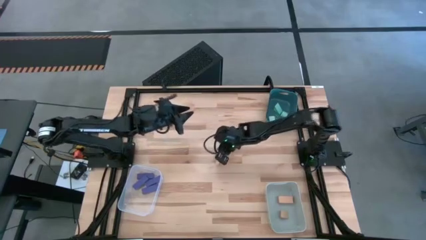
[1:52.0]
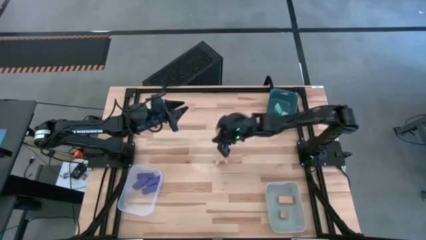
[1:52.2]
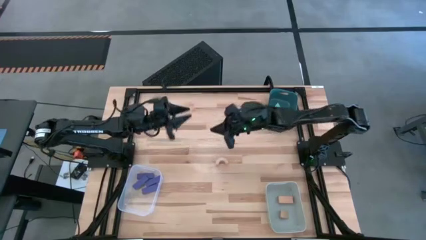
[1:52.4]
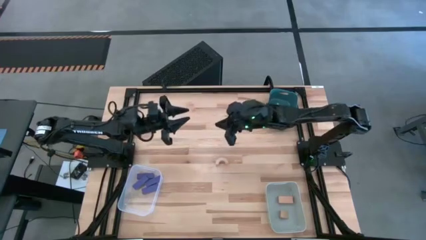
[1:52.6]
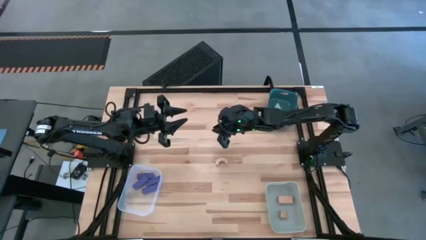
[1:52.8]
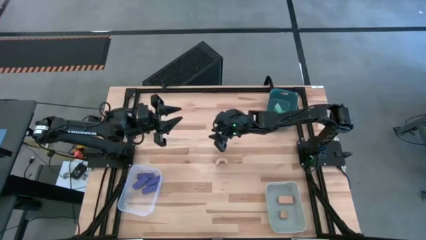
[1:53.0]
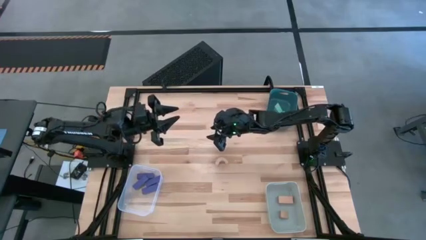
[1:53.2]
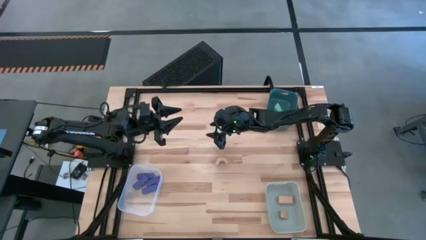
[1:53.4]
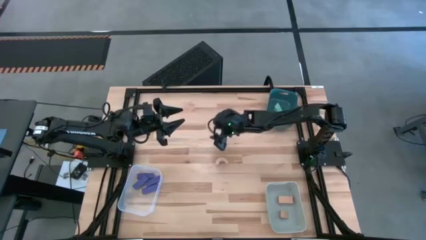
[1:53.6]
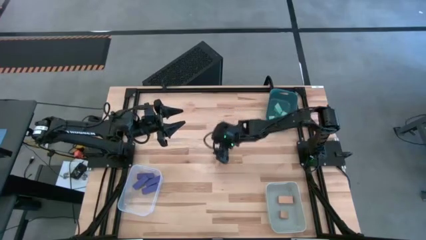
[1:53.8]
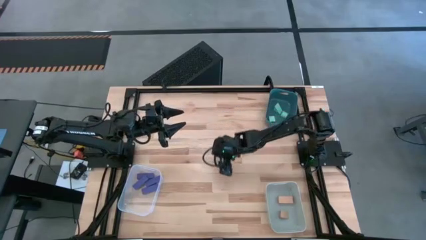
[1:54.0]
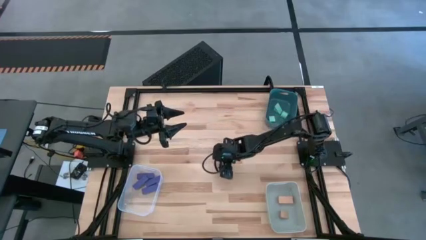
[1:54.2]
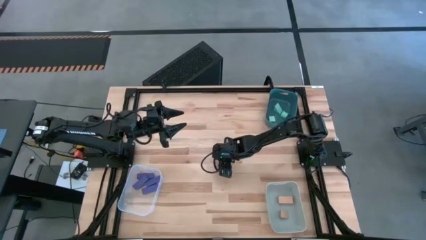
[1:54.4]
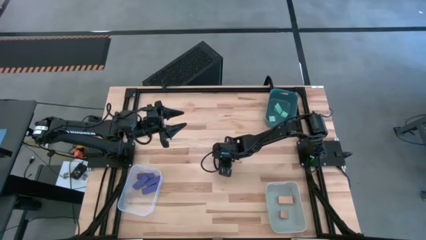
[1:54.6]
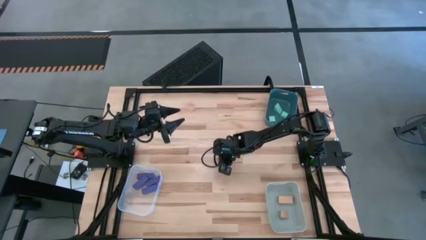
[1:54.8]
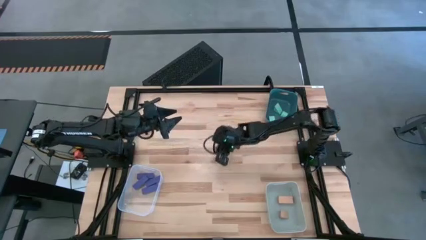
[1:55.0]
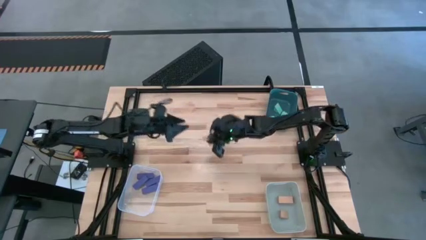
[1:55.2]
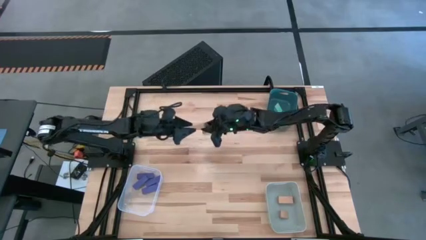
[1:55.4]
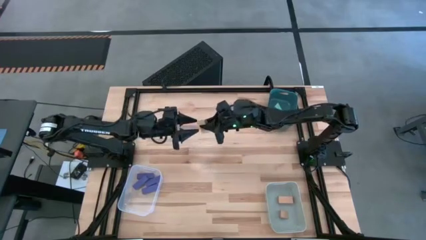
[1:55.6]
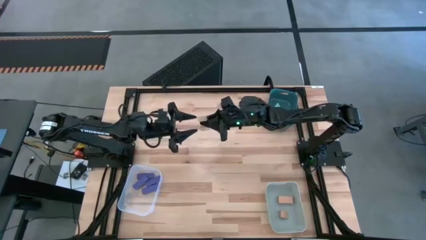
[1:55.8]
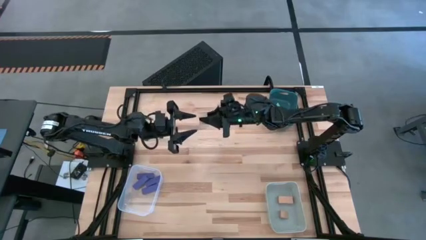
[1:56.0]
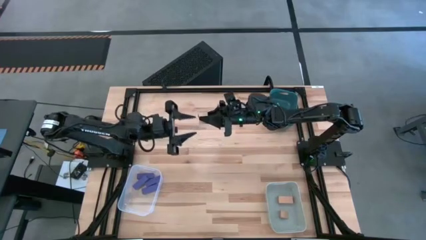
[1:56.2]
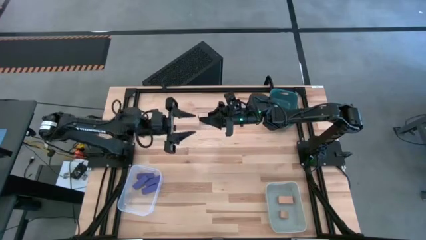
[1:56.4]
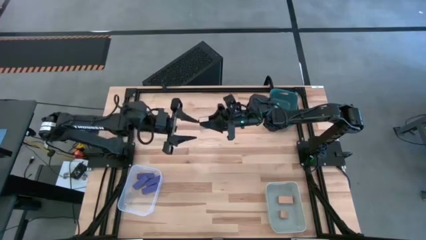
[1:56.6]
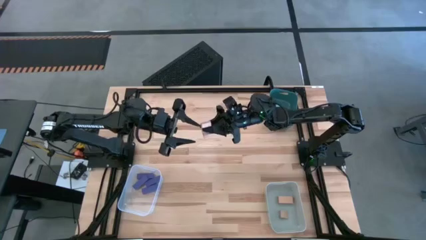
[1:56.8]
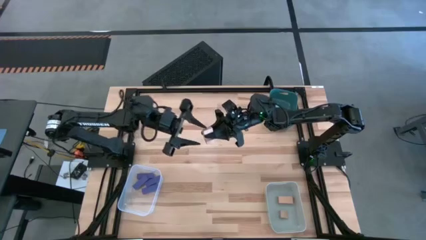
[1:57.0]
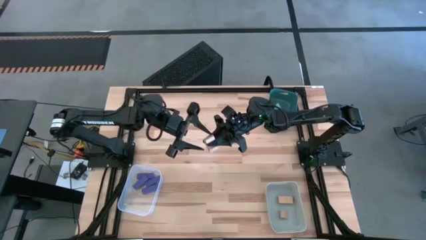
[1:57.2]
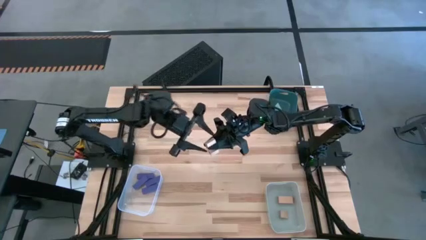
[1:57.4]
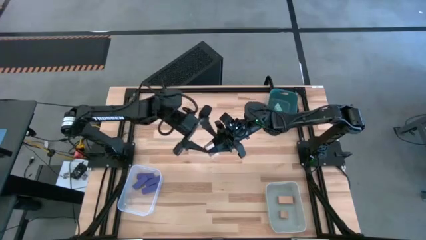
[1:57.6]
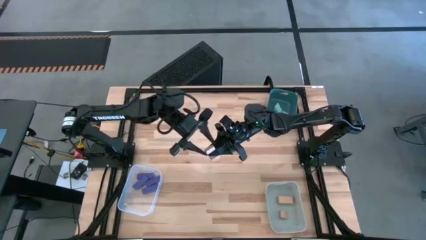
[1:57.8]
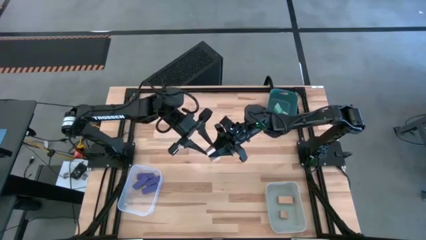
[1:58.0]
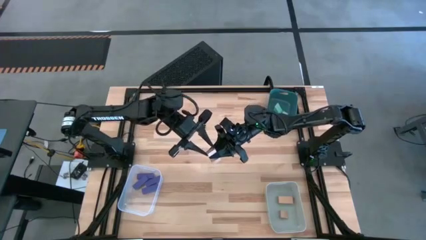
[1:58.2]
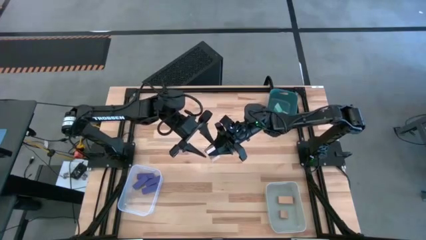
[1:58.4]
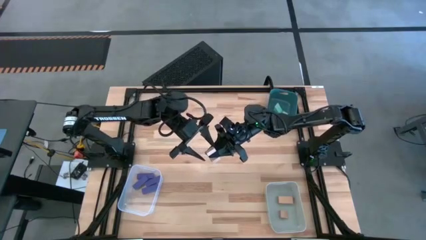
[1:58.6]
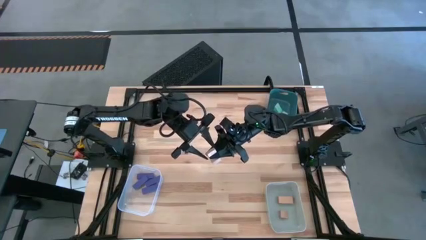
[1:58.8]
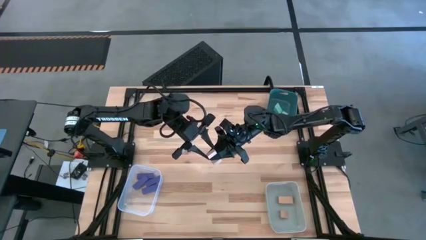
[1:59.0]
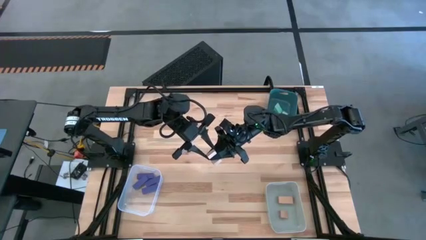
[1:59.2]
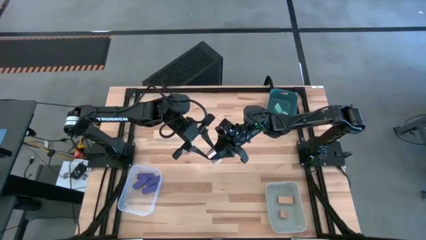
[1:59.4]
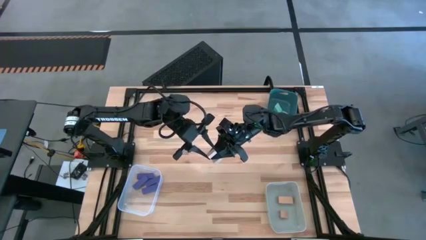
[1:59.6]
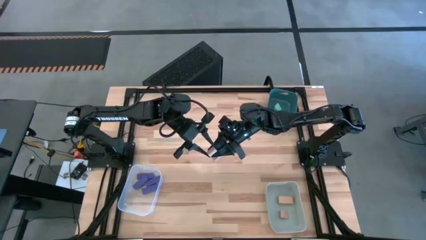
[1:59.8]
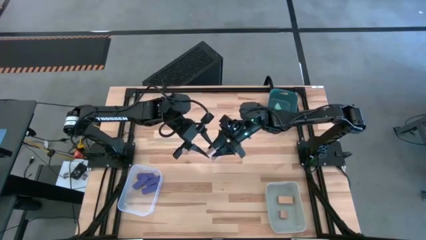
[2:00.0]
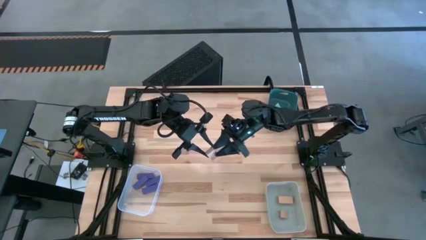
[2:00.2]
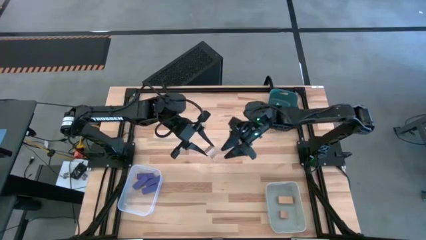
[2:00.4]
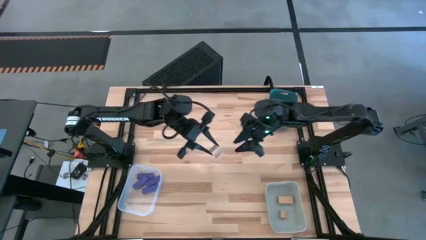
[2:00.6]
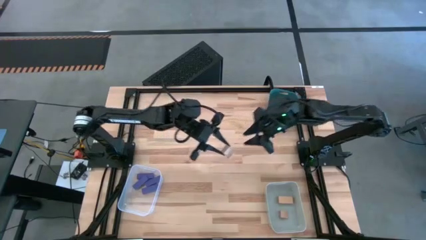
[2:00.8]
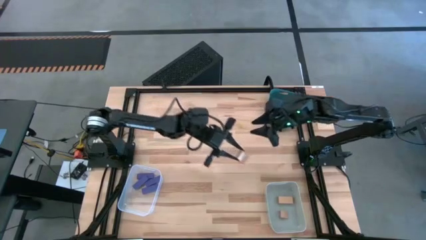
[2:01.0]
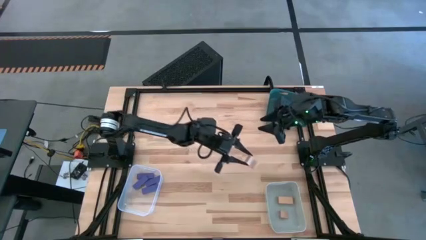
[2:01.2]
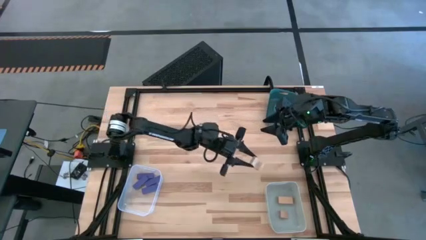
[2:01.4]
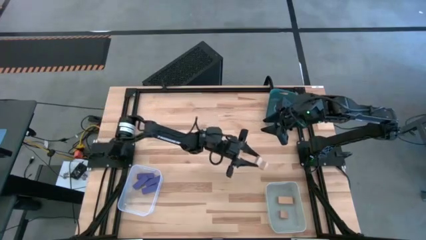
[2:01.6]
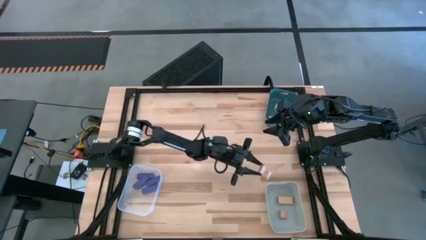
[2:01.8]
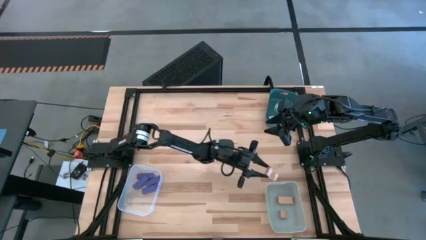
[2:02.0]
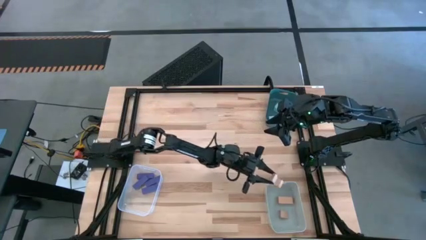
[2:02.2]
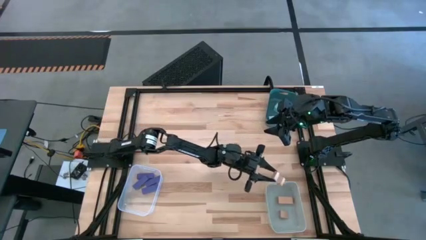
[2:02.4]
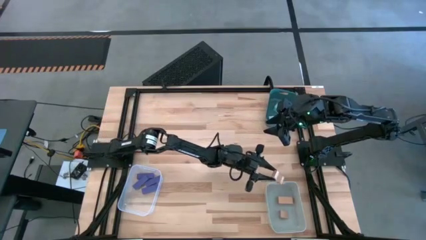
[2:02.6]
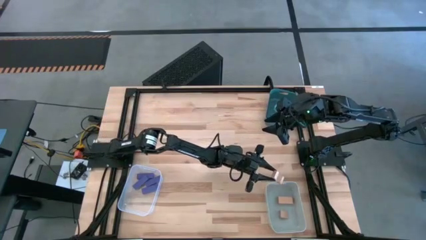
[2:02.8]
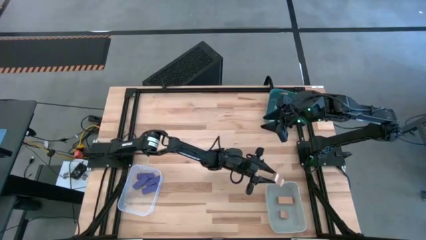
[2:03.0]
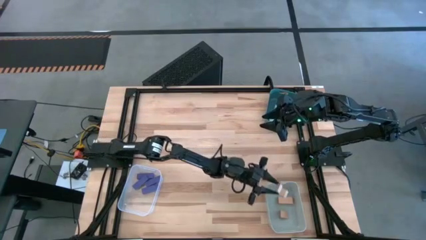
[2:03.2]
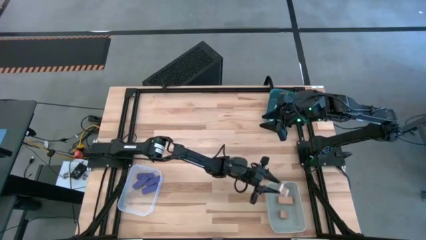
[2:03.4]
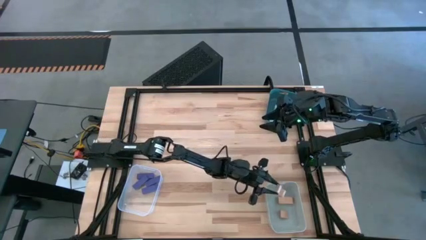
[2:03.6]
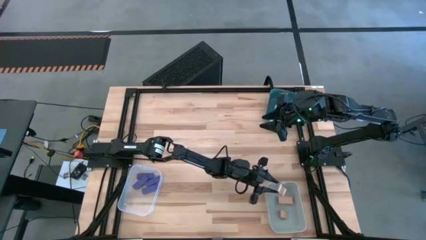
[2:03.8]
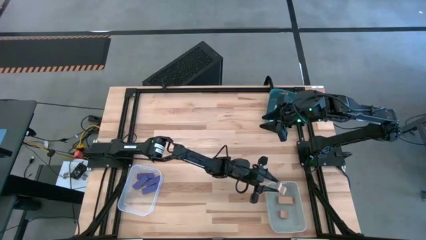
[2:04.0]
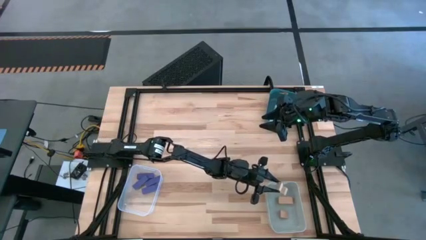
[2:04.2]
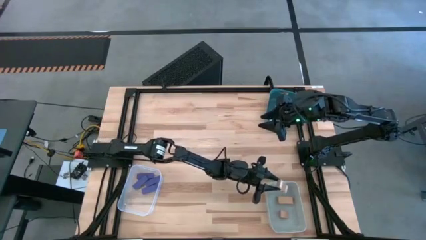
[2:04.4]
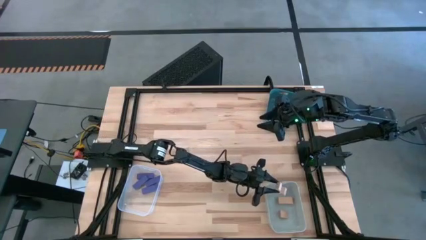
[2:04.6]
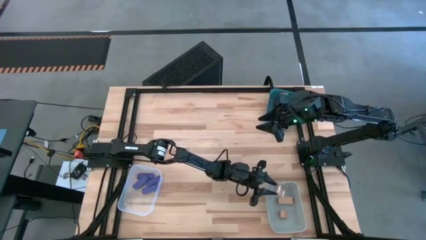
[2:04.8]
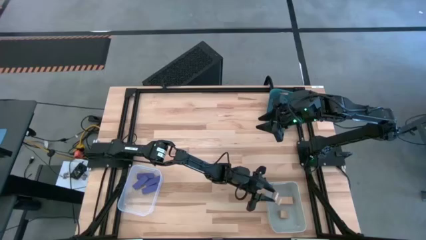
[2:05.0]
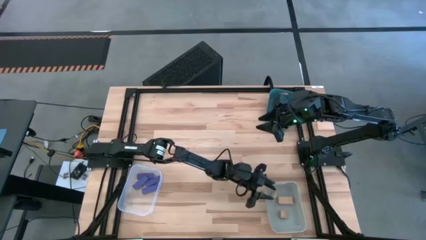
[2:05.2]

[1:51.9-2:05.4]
Task: Sort & place blocks by color
Put the brown block into the gray bin

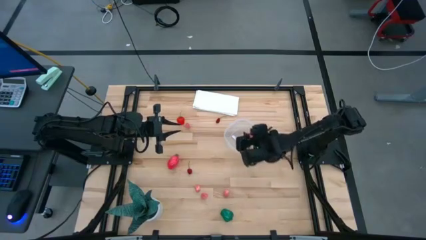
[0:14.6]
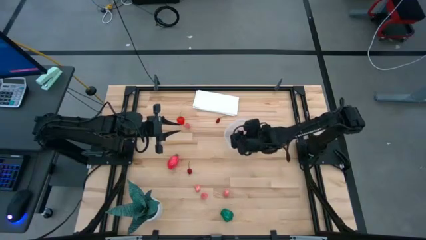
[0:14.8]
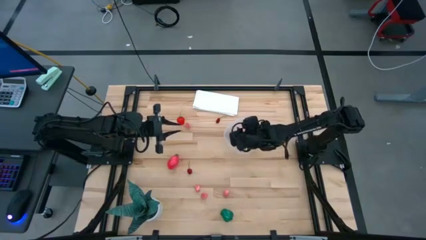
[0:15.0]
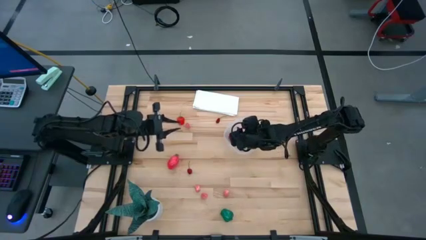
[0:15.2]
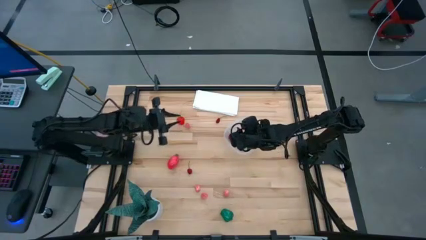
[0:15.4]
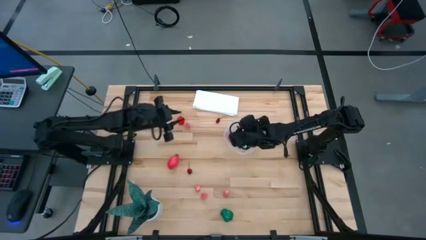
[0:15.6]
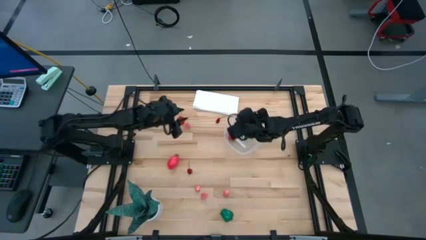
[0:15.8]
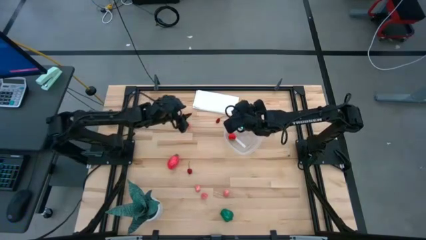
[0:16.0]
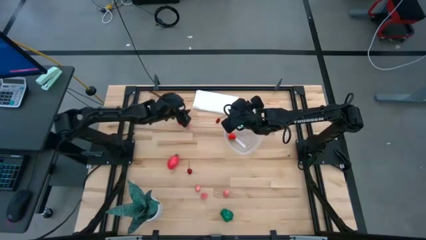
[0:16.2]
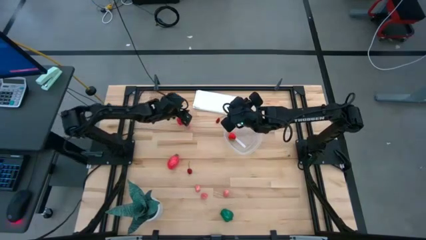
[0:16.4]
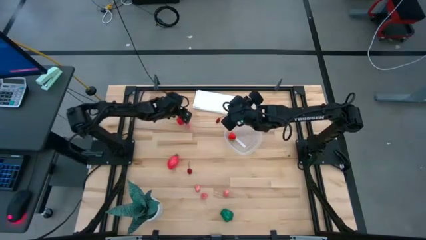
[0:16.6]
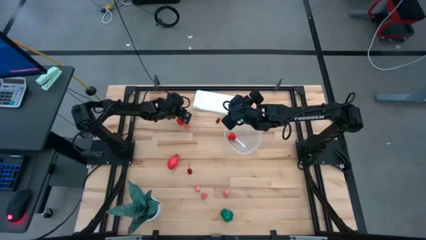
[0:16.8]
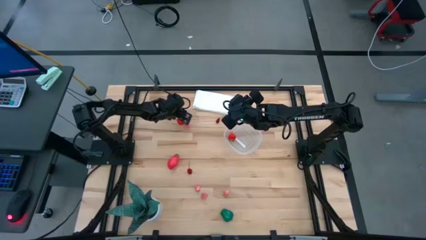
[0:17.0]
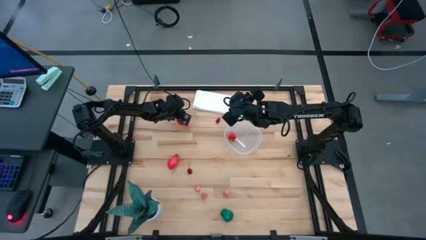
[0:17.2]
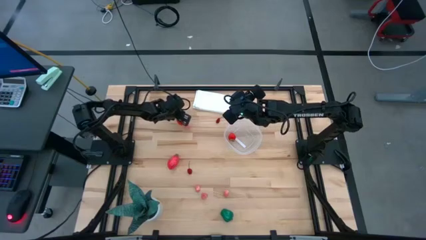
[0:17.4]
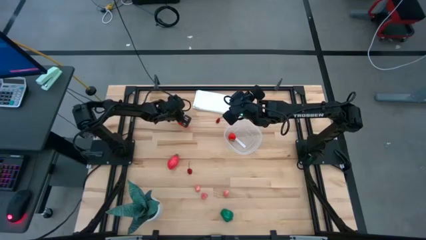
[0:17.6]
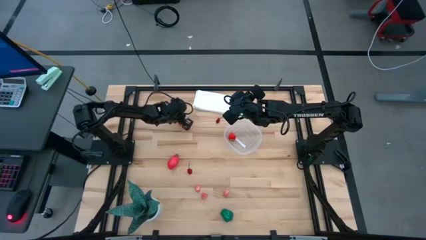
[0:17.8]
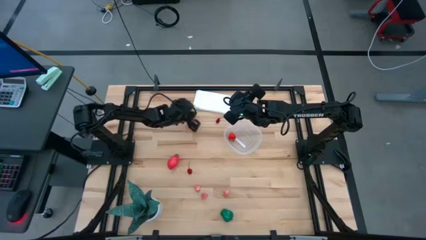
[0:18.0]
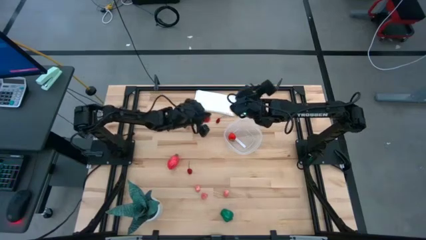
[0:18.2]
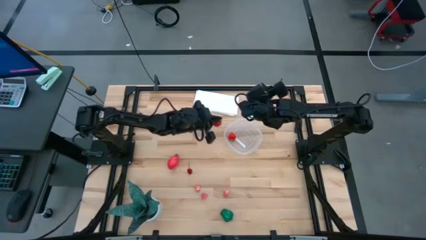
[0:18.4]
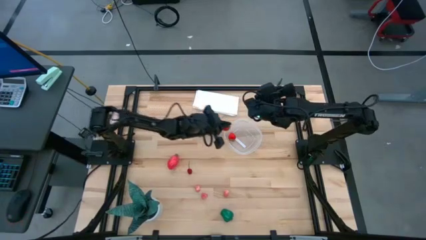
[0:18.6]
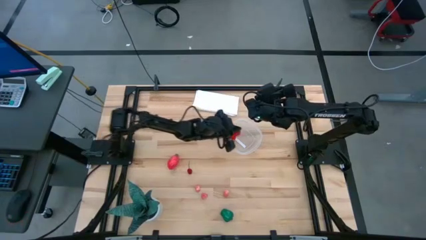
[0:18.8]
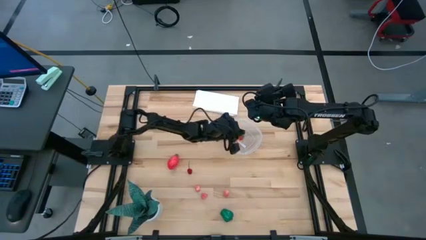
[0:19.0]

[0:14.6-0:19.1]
Task: Pick and placing Produce into tupperware
Put the red strawberry into the transparent bin
